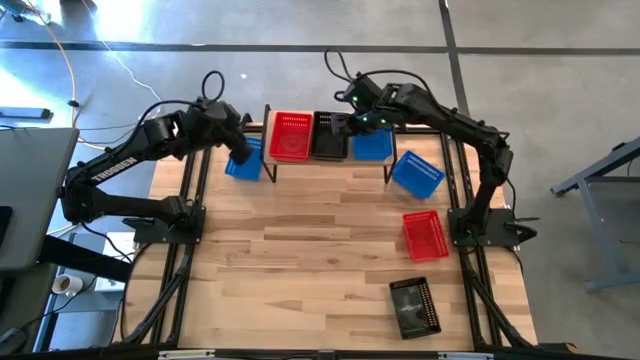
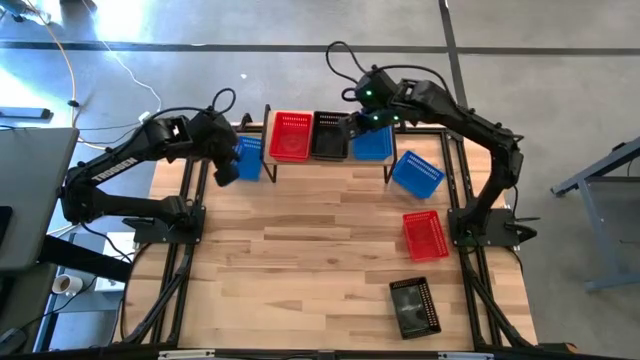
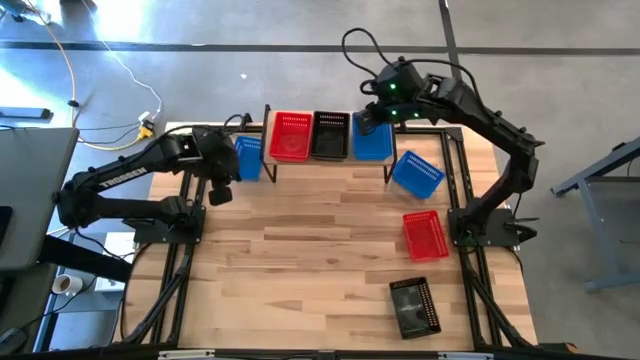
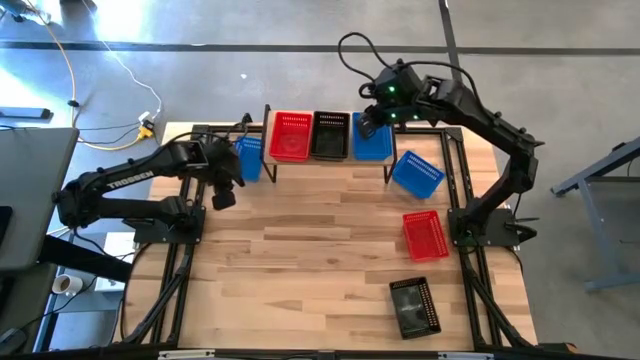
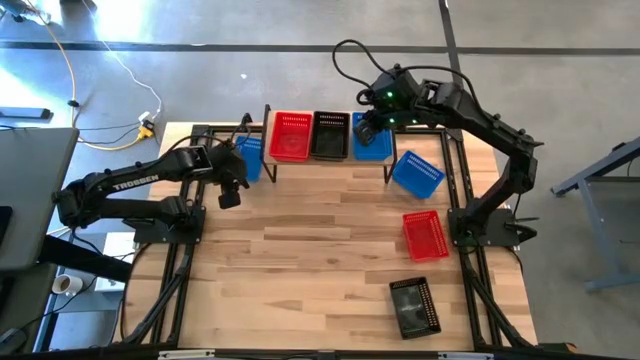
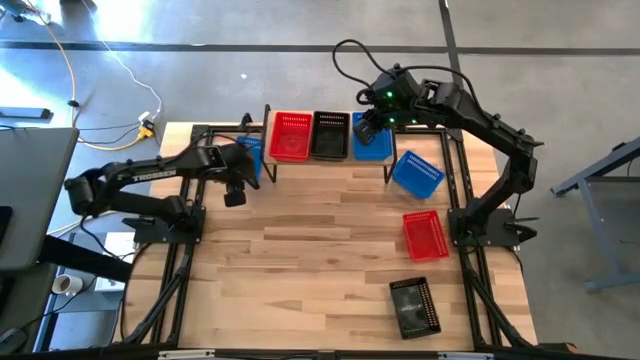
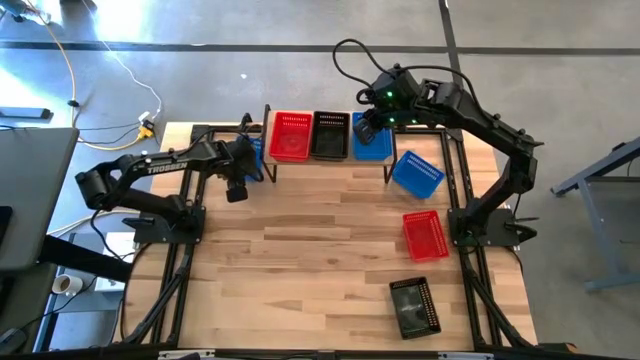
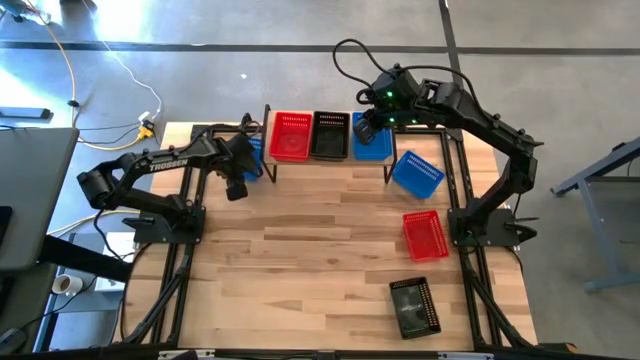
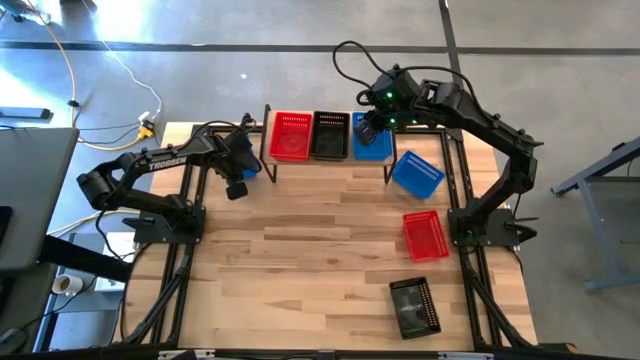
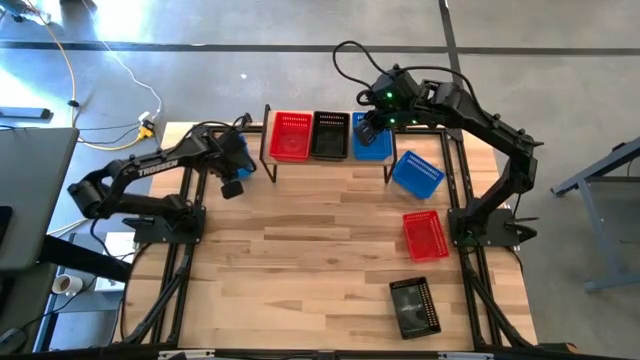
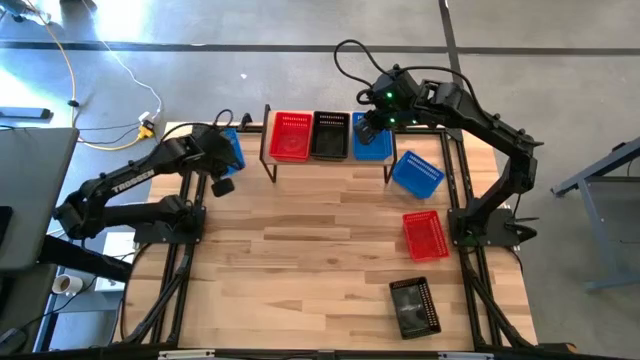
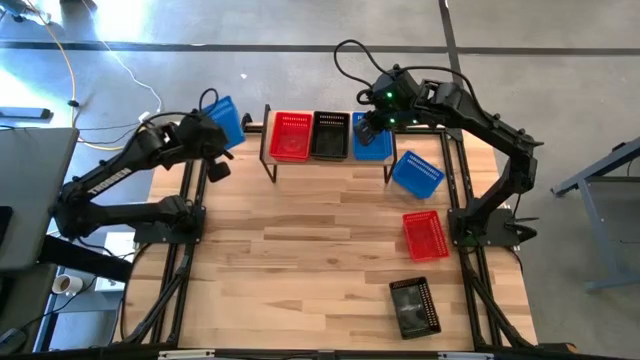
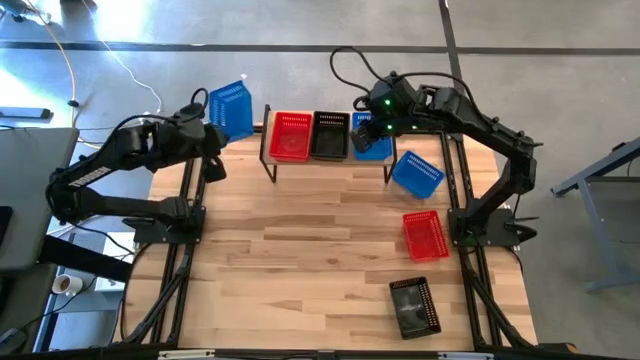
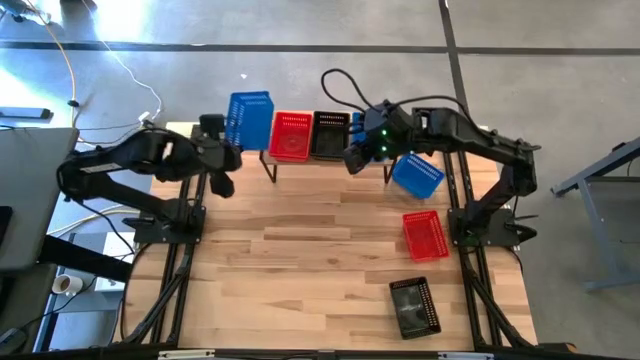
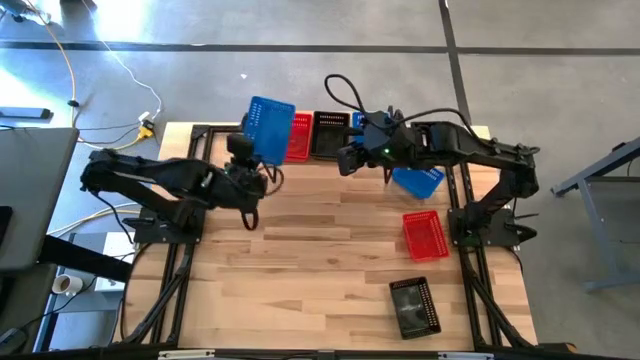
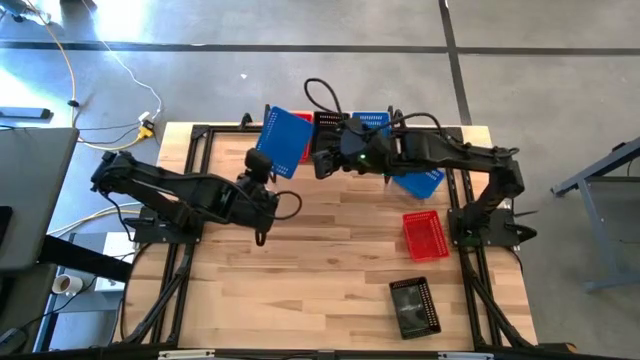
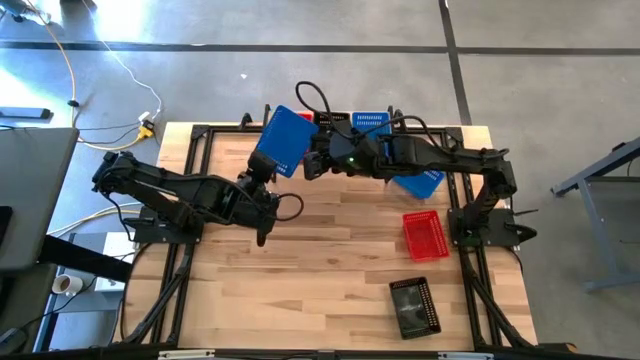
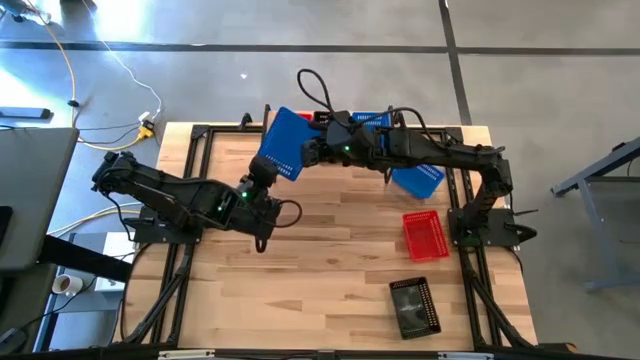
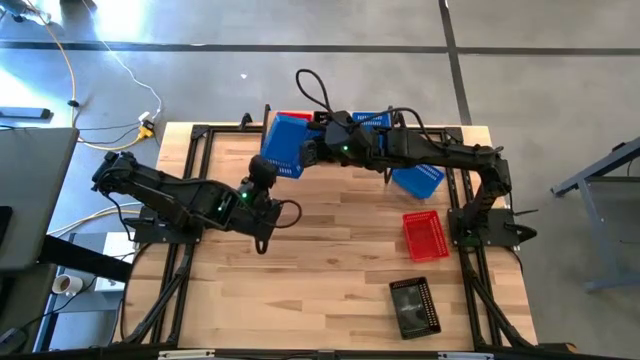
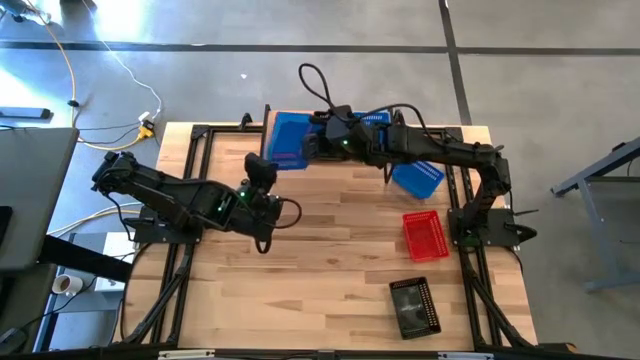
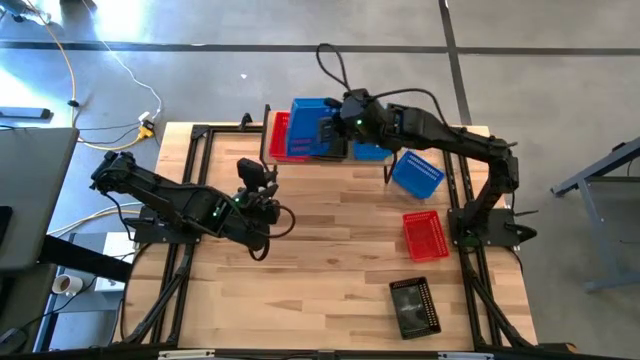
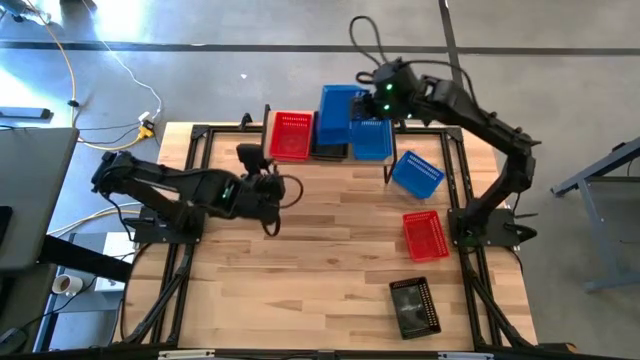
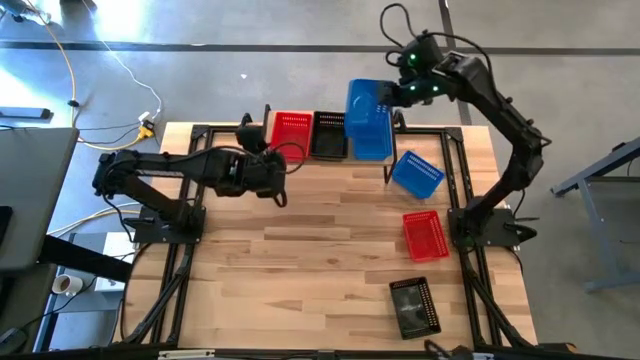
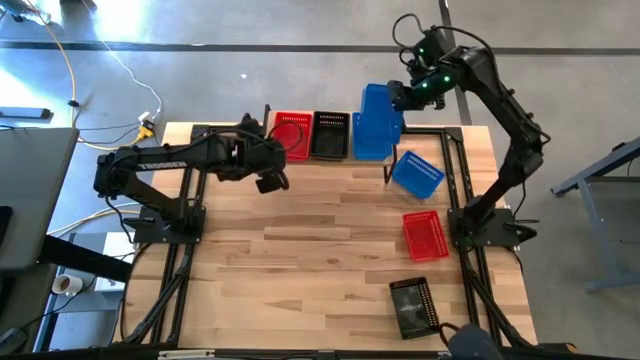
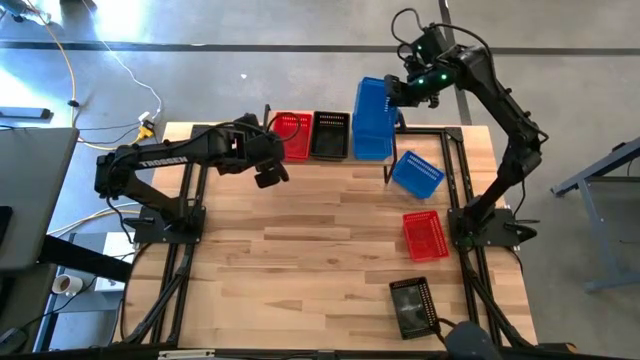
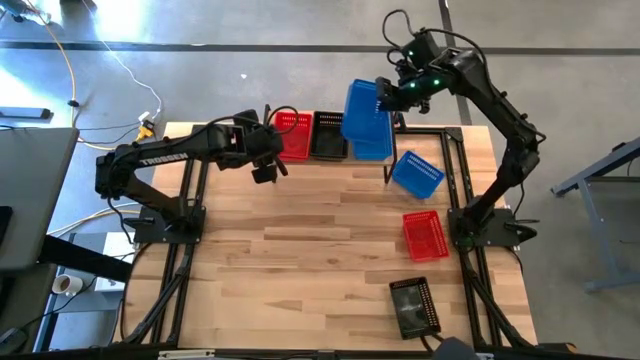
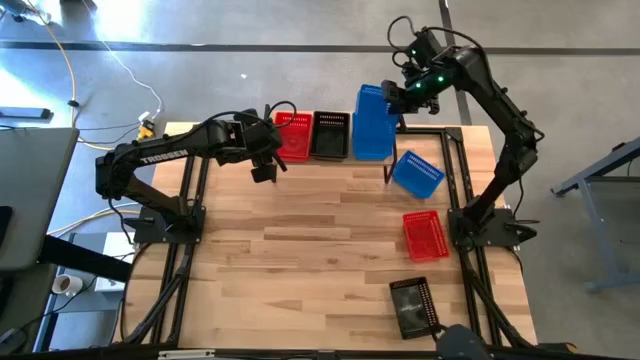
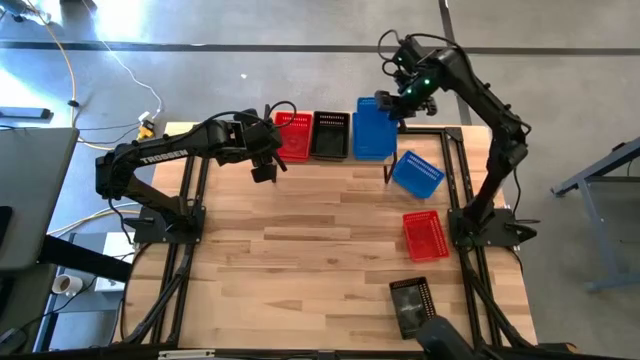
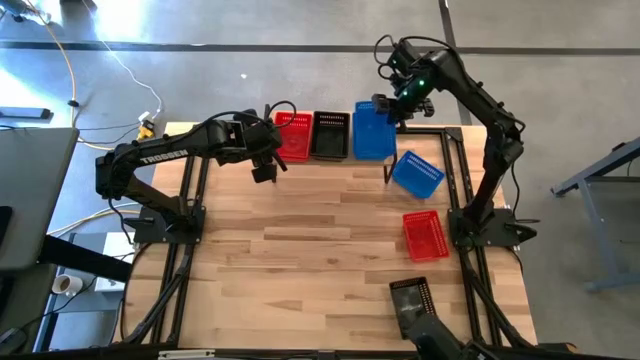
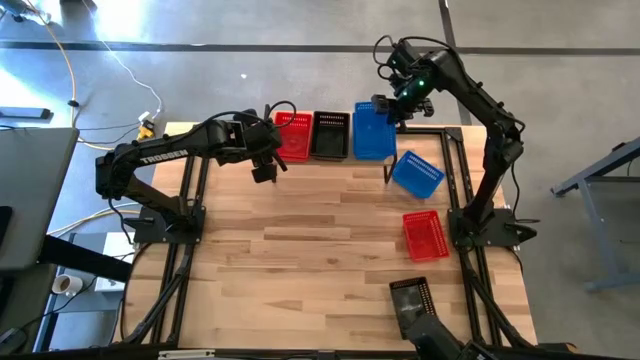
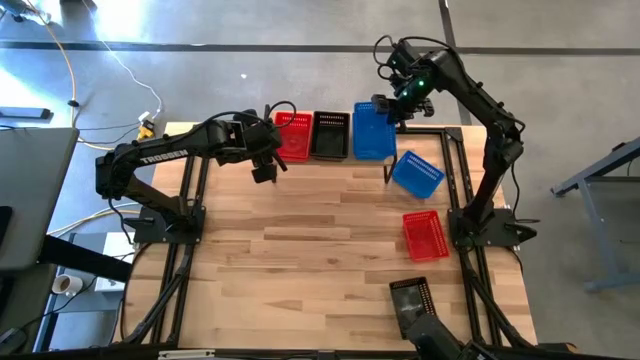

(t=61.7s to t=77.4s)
Task: Stack baskets on shelf by color
Stack the left blue bin on top of the blue bin on the shelf

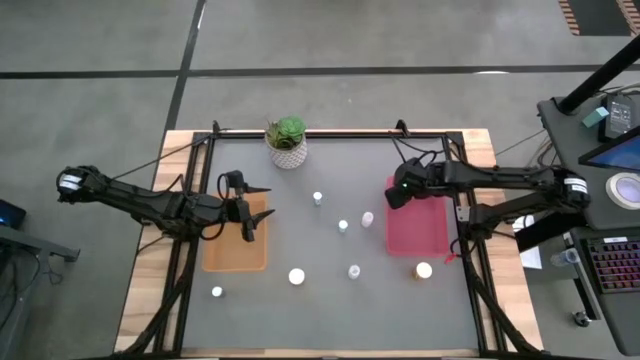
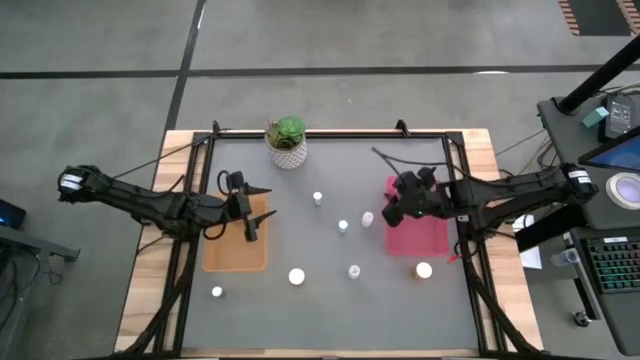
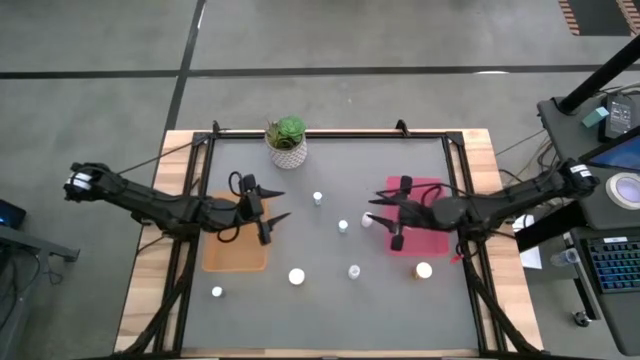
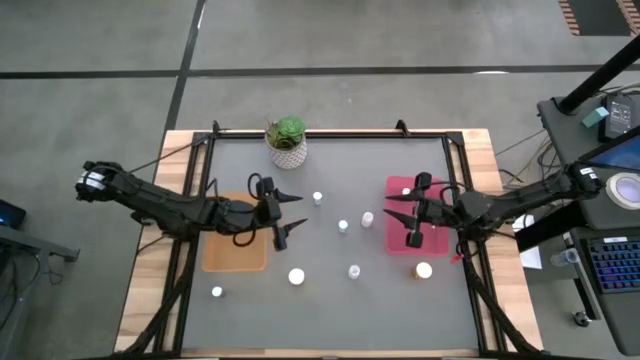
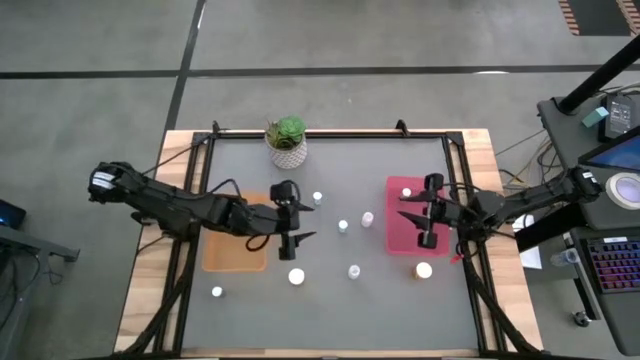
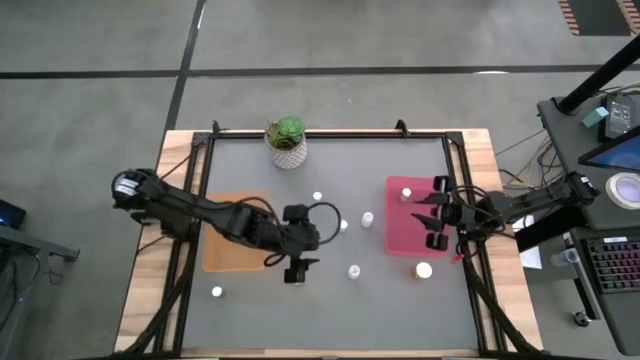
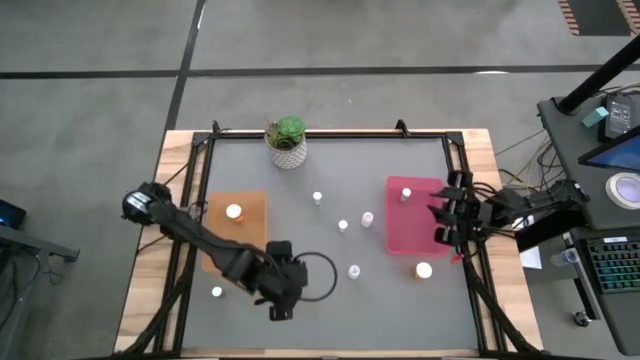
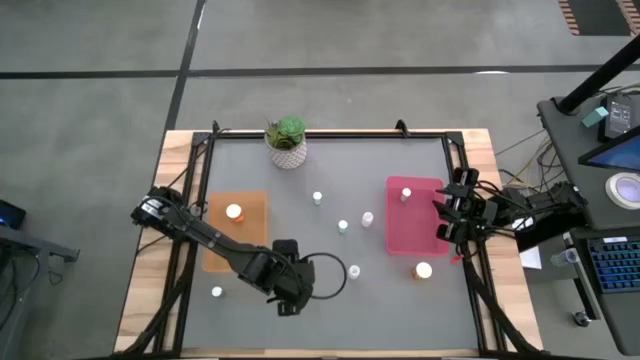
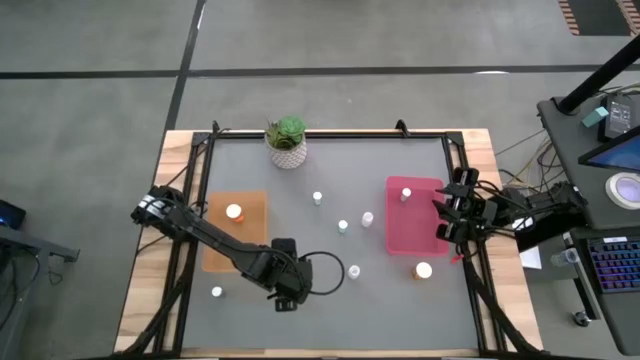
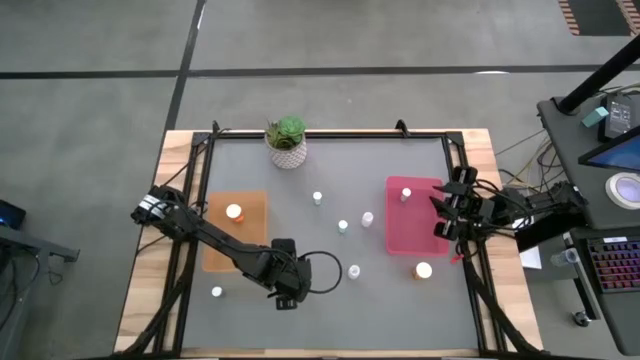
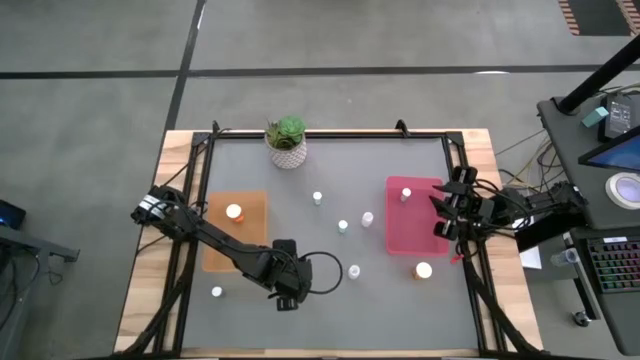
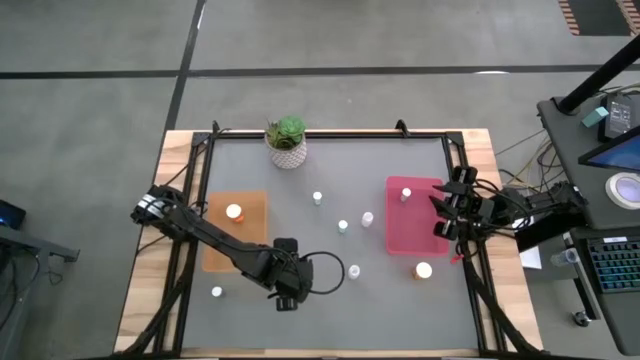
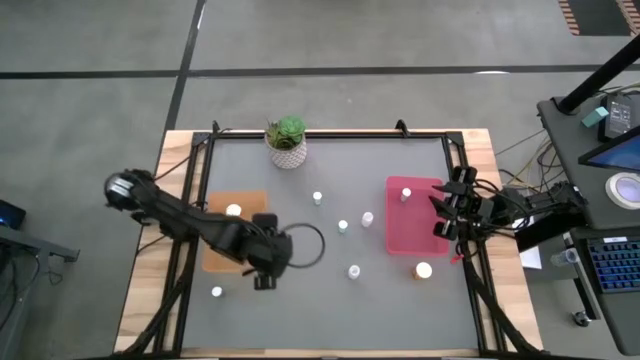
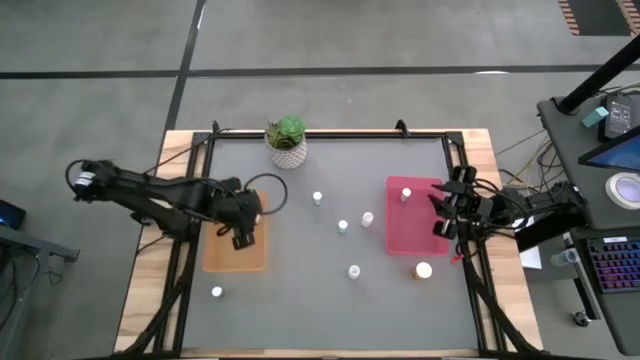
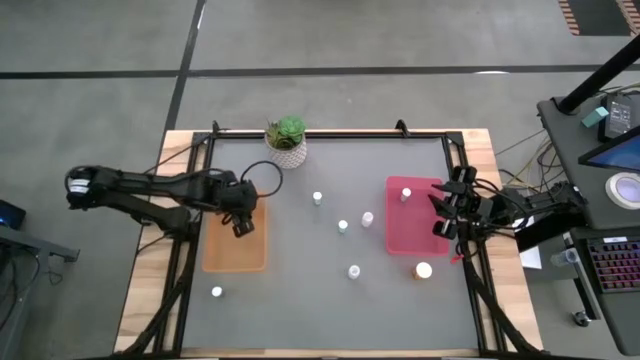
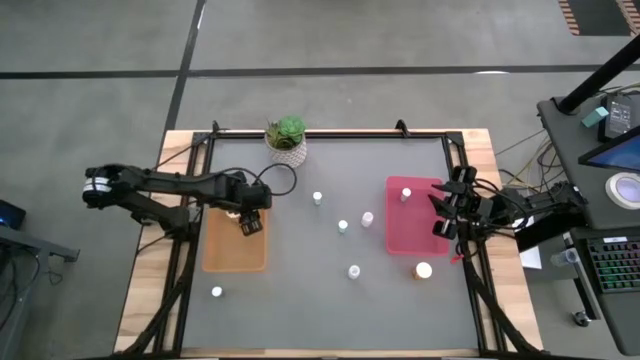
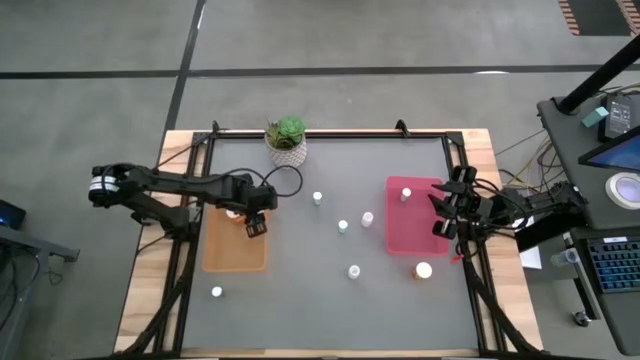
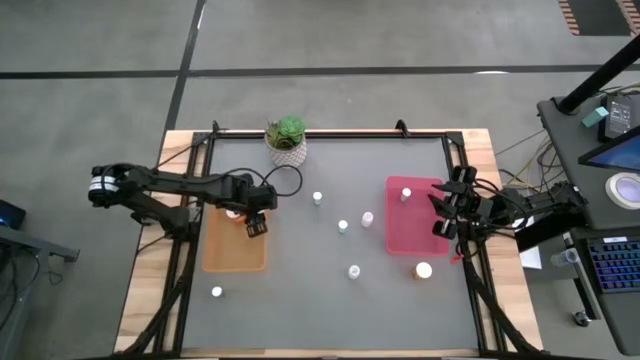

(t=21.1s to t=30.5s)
Task: Pick and place medicine bottles into bin by pill shape (circle, oval)
Put the left orange capsule bottle into the orange bin
